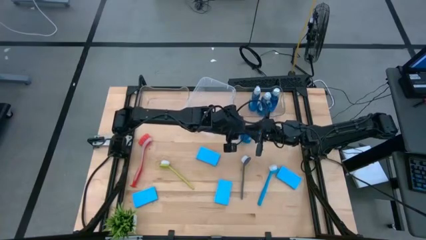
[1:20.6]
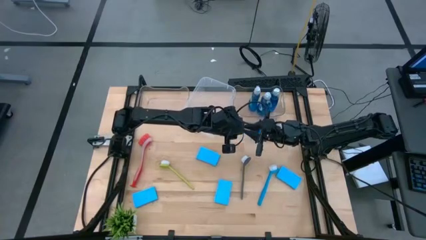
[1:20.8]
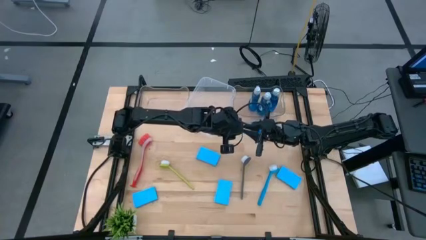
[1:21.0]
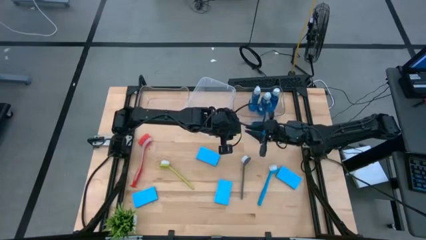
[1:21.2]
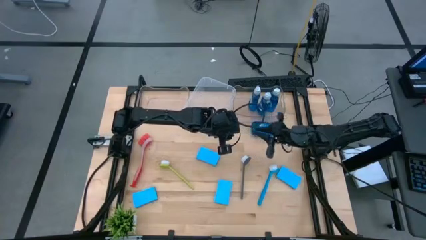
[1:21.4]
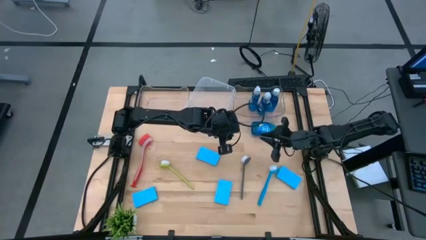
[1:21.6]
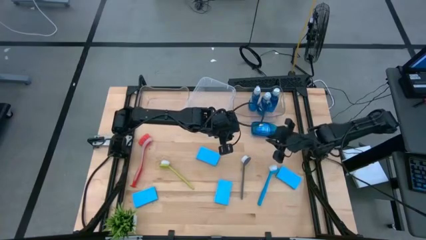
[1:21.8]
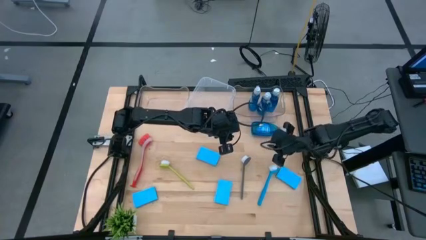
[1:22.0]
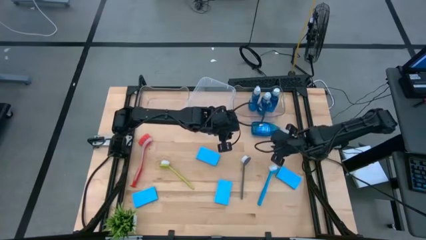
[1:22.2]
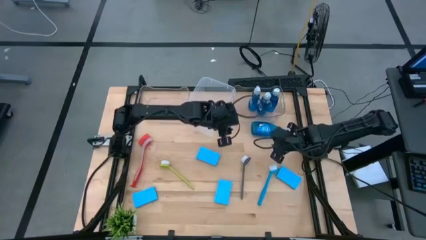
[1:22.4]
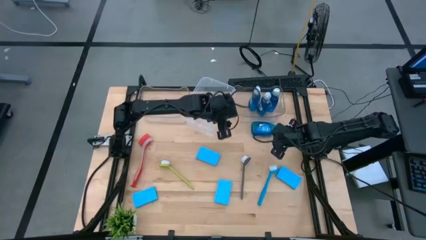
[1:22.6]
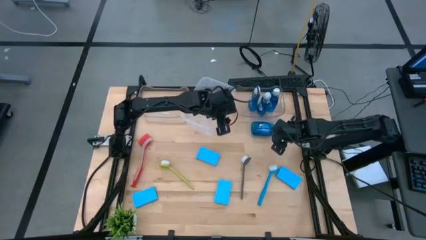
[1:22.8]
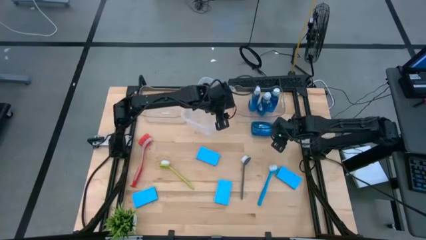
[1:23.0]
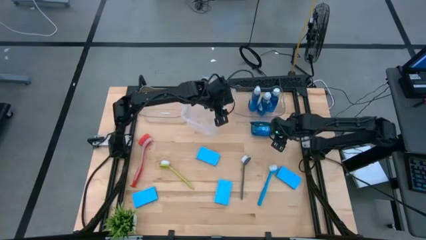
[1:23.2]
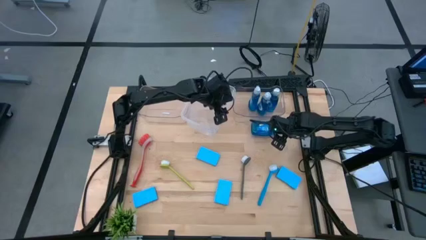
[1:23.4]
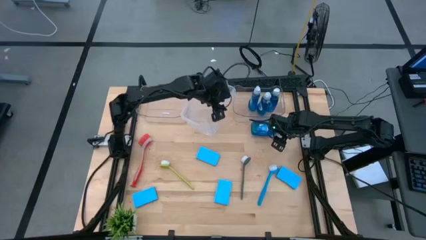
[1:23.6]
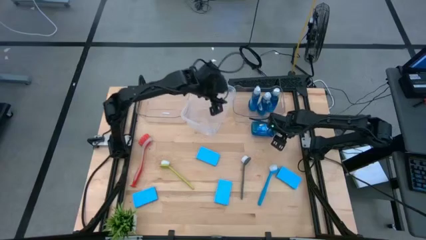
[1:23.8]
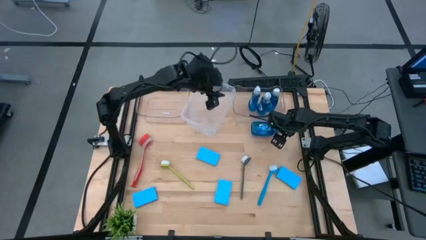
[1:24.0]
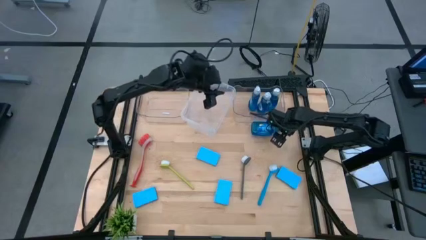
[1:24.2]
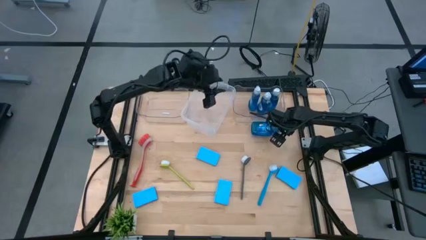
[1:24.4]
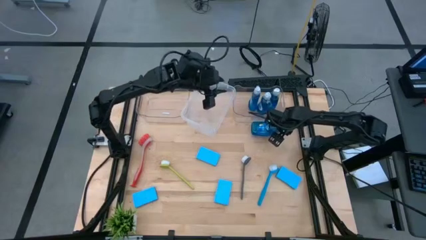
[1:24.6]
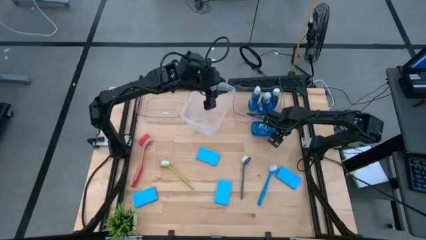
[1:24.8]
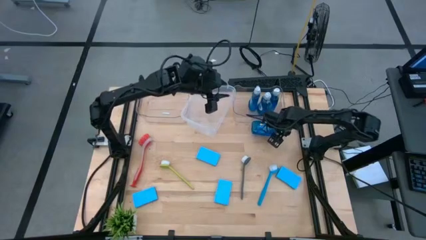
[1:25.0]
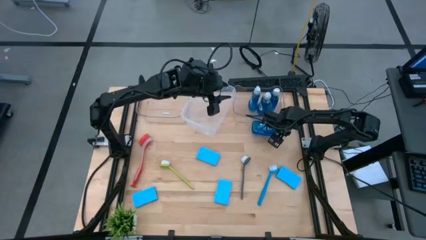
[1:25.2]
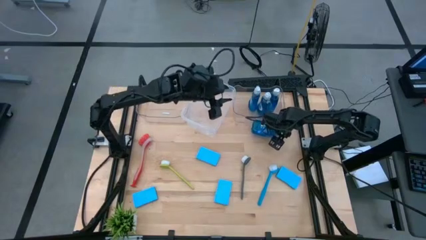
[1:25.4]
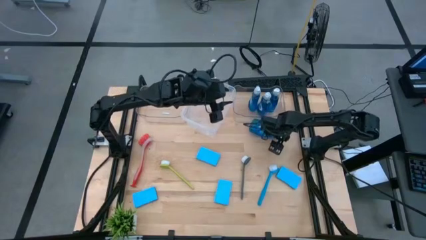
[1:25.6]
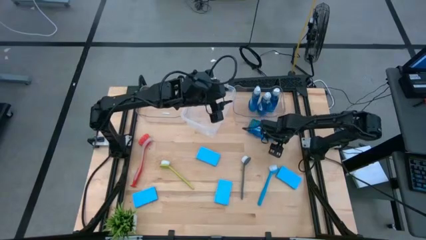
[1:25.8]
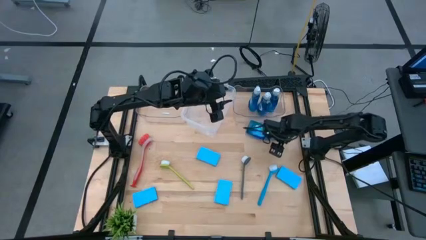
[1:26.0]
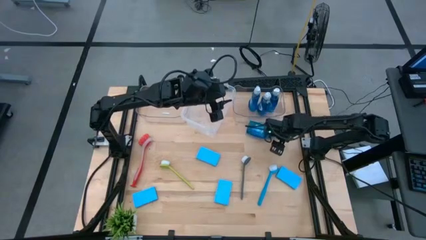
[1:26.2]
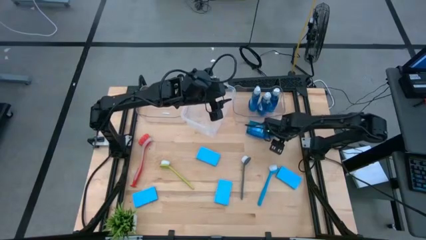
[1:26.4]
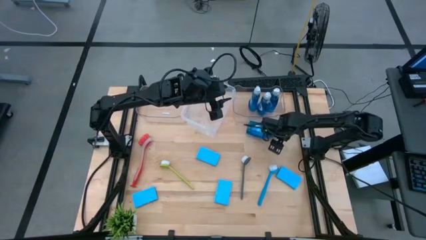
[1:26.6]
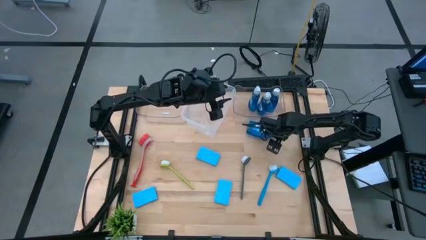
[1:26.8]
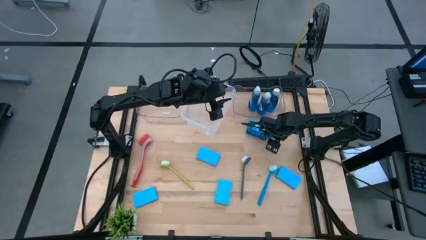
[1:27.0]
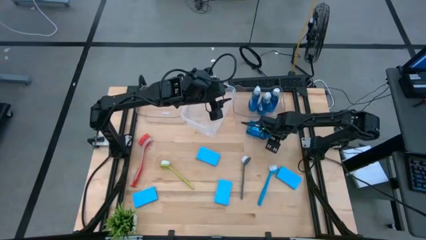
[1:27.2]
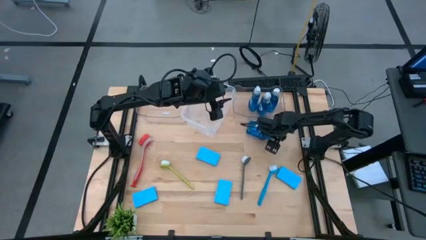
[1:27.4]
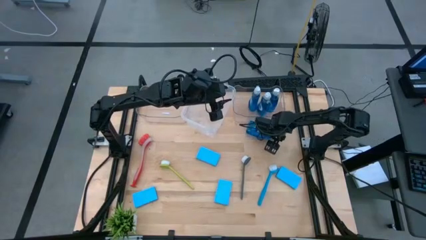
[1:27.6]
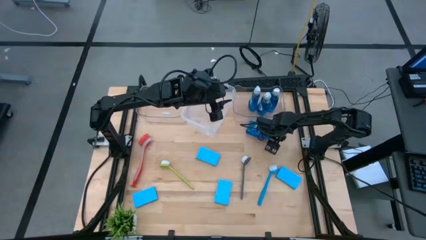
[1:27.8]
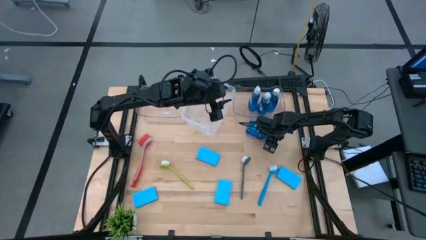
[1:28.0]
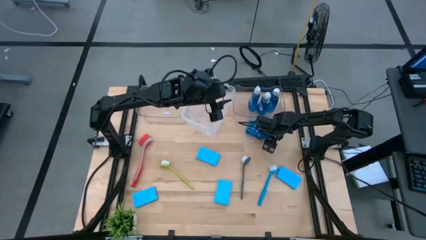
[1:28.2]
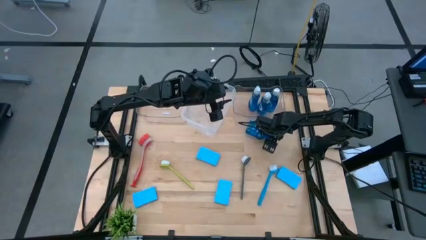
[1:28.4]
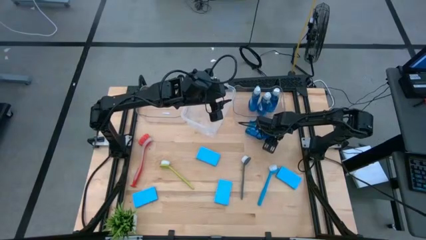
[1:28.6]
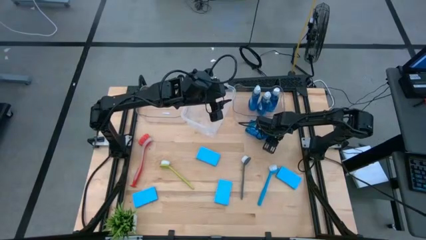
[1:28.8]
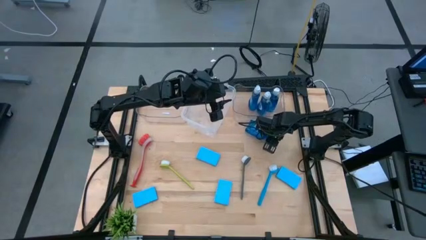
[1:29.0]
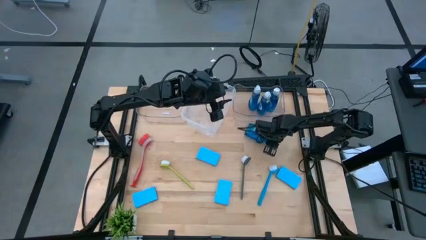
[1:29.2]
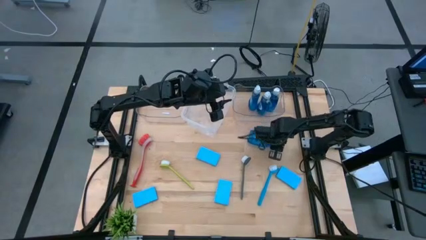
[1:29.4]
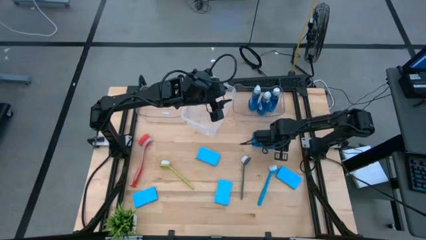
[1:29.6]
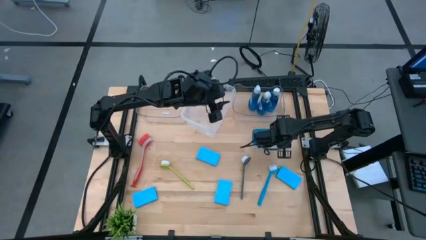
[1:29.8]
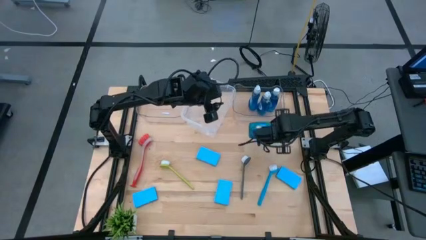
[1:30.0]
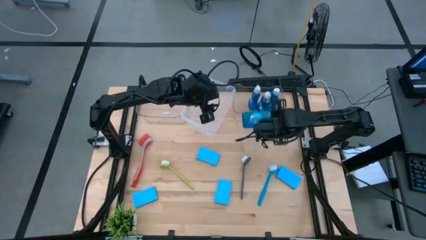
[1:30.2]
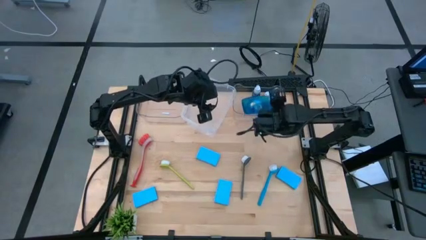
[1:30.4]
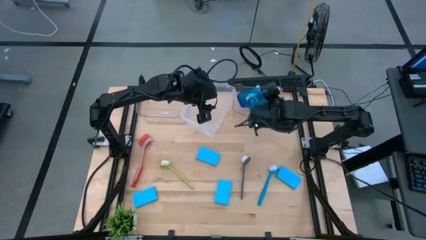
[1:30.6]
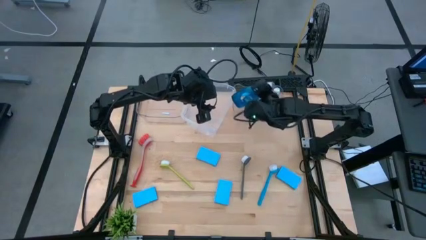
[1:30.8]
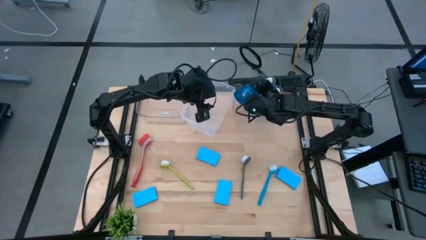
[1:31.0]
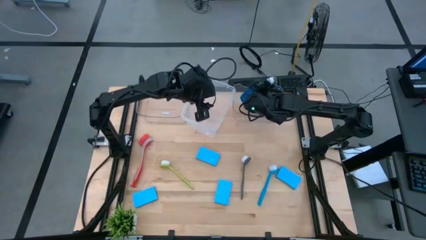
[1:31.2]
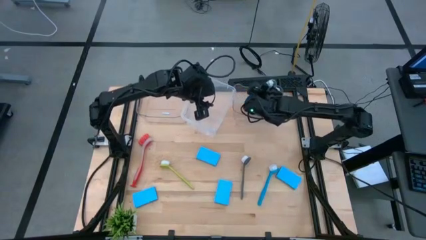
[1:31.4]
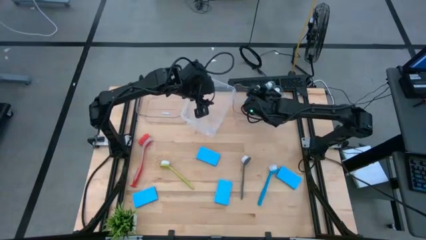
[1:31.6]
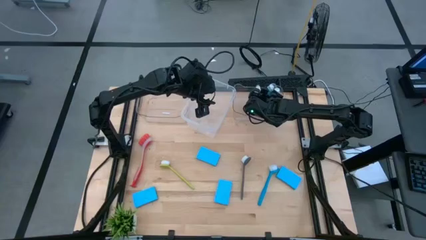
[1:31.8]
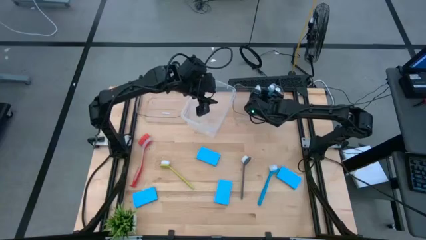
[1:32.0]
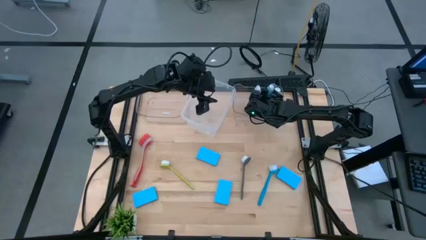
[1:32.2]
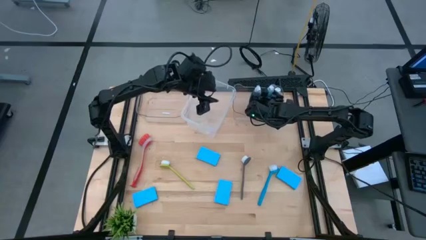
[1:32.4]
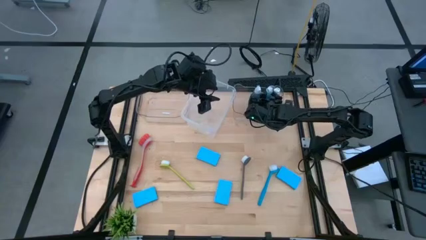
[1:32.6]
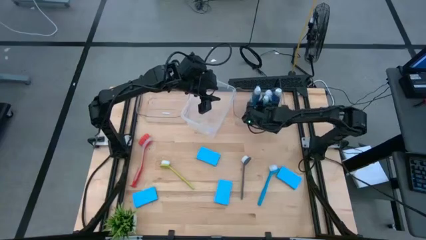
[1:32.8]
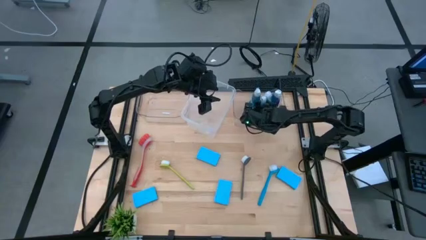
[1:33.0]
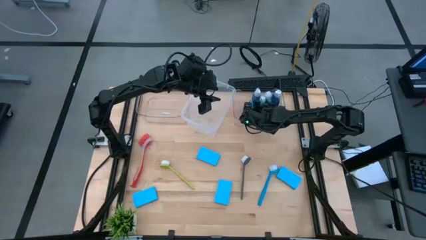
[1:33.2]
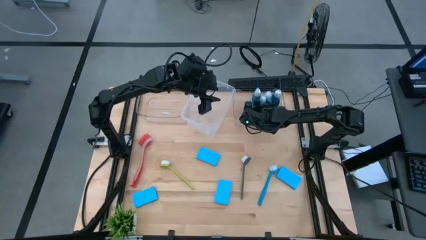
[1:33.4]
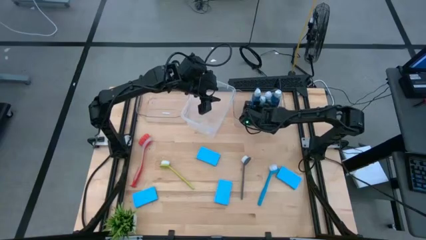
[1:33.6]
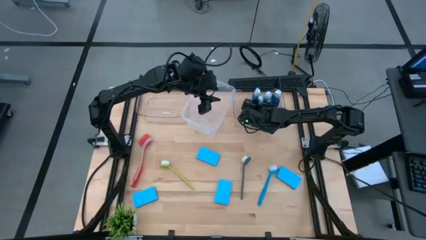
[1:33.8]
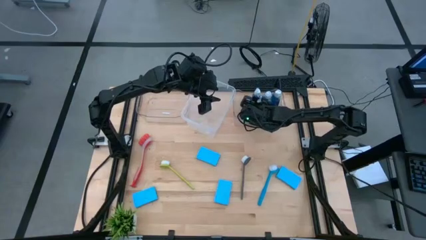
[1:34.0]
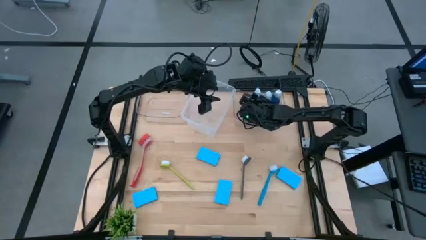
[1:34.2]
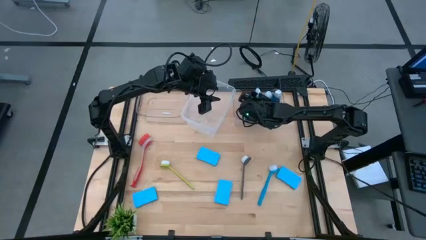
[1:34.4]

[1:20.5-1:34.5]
Task: Pick & Place Kitchen Sink Supplies
Put the blue dish soap into the right transparent bin

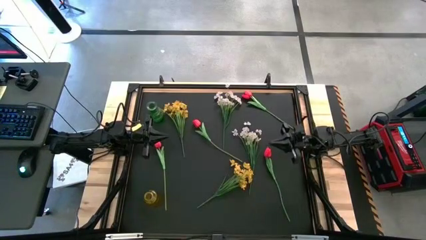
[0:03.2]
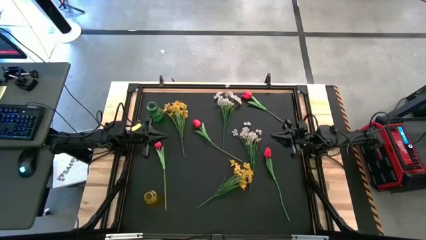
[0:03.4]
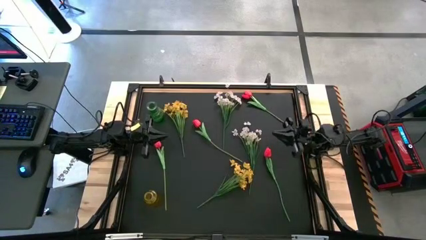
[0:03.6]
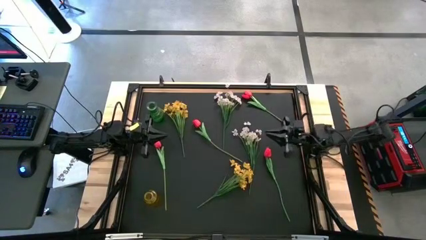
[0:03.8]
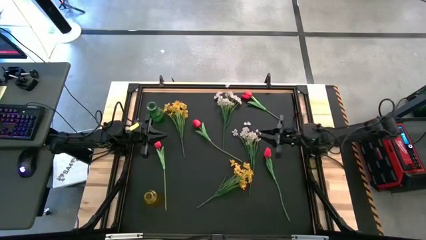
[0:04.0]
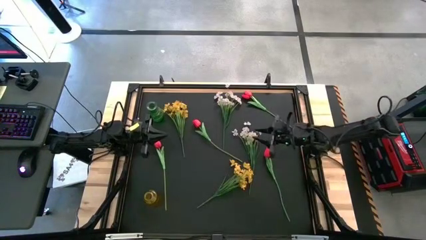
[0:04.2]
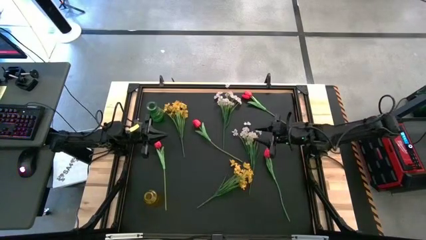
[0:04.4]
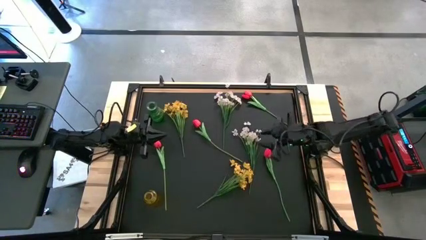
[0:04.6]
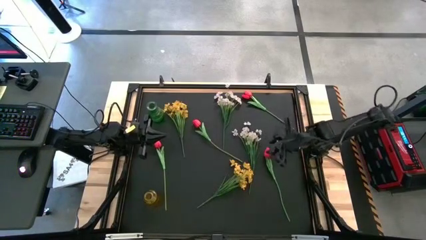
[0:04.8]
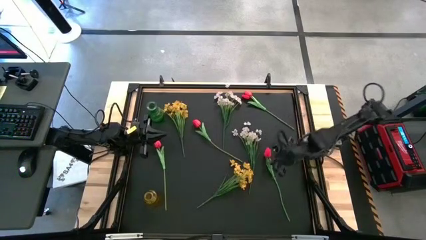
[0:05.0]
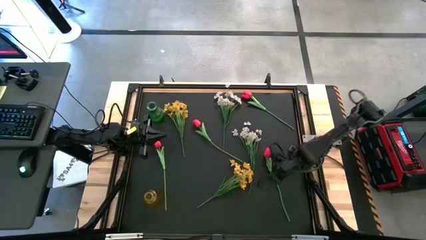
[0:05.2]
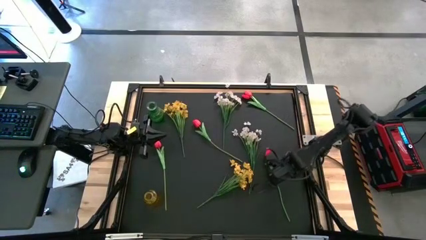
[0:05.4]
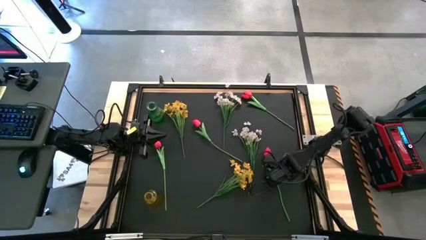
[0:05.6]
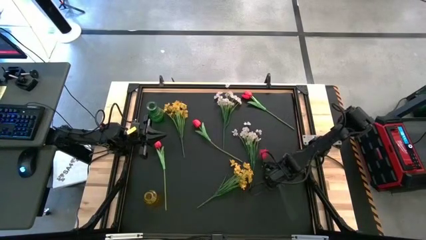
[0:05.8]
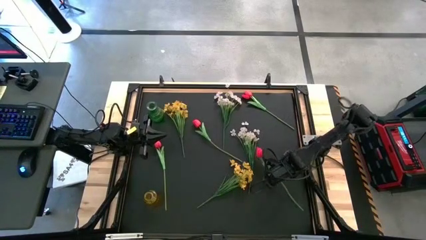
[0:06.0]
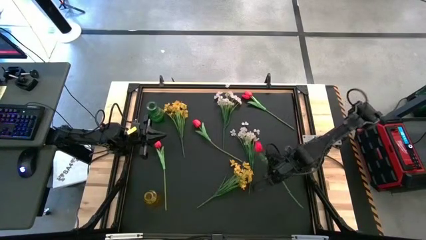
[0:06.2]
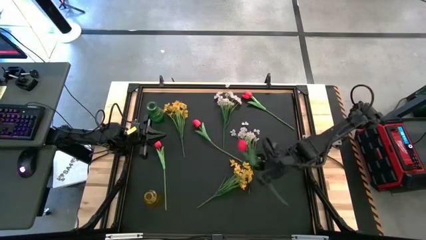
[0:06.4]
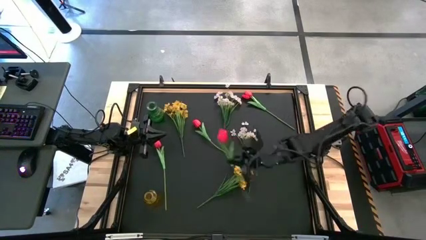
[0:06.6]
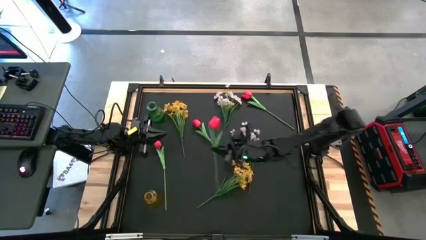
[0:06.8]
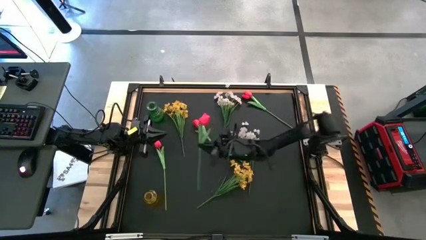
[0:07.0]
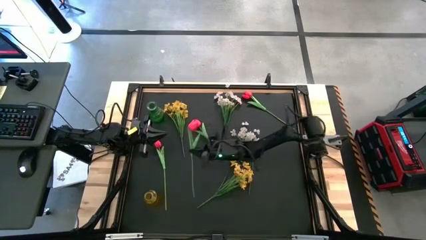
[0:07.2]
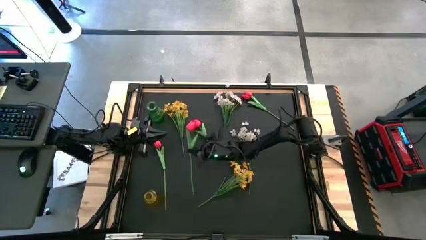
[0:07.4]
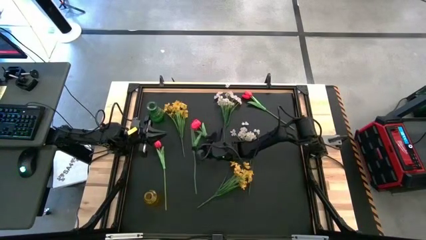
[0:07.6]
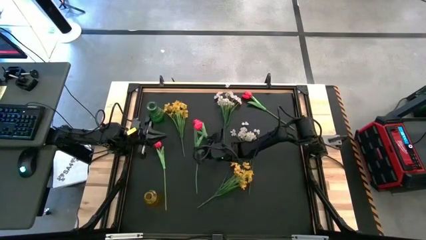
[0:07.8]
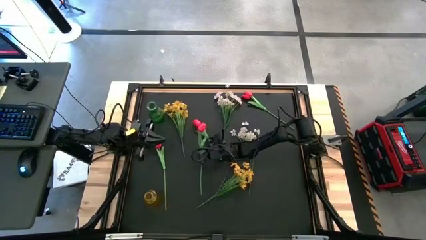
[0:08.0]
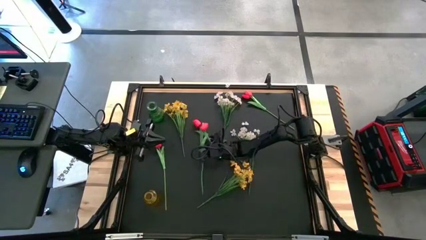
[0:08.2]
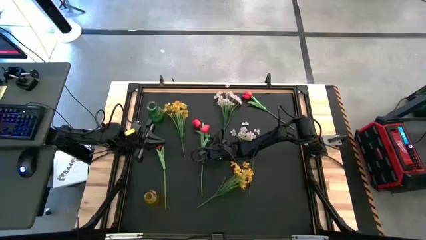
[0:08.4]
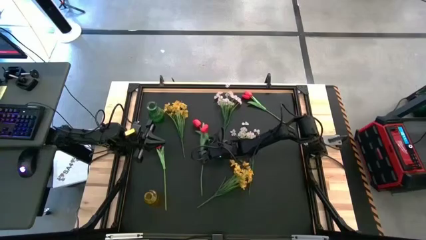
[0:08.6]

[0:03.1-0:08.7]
Task: Sort flowers into vase by color
Move the red tulip to the center of the table
